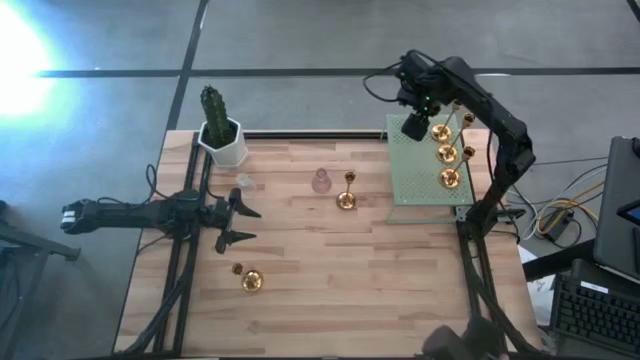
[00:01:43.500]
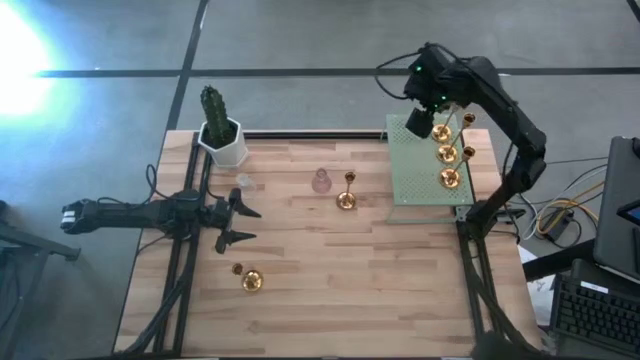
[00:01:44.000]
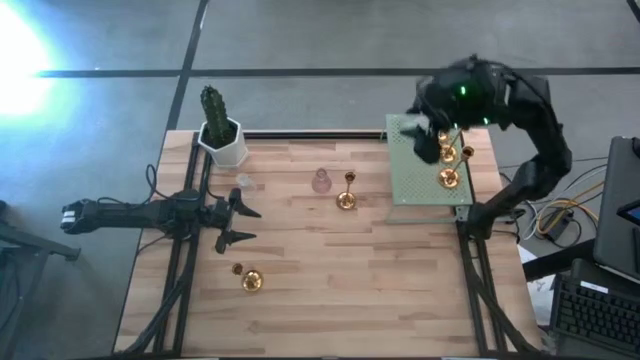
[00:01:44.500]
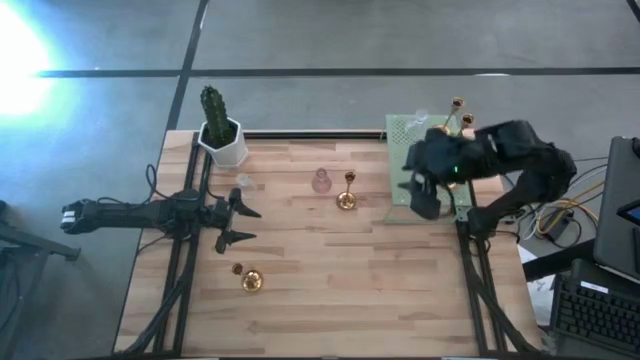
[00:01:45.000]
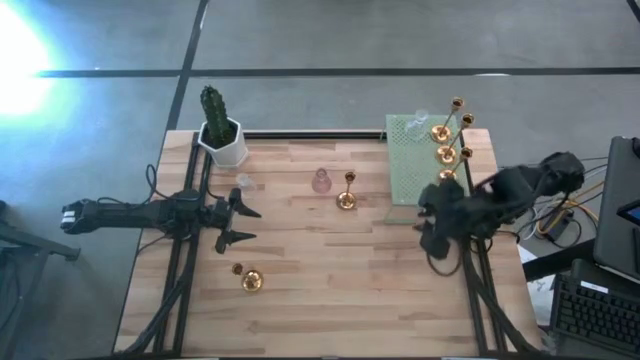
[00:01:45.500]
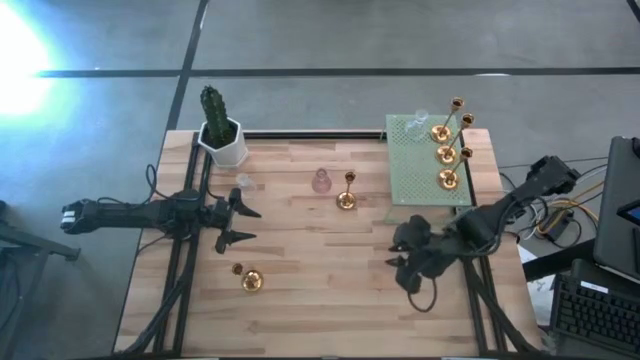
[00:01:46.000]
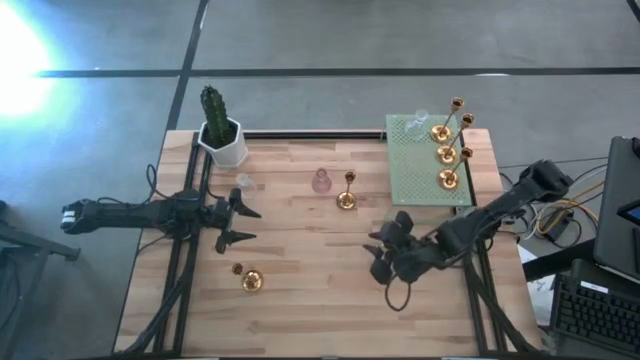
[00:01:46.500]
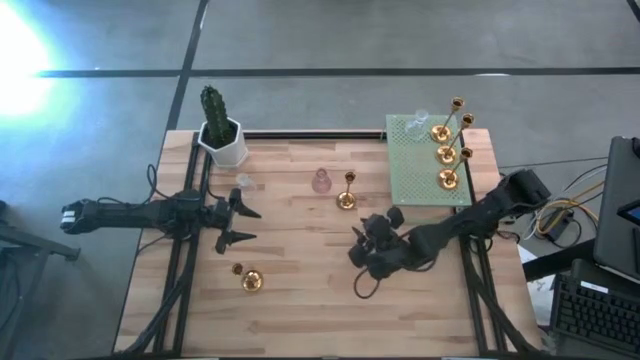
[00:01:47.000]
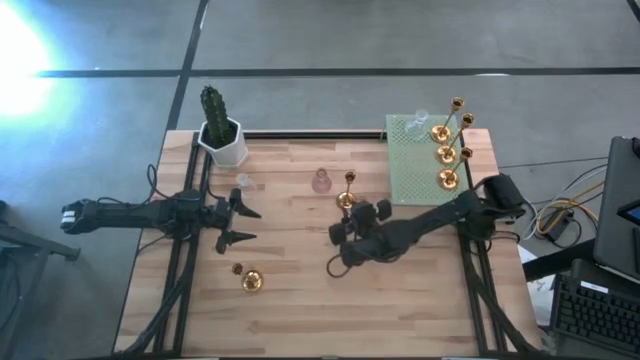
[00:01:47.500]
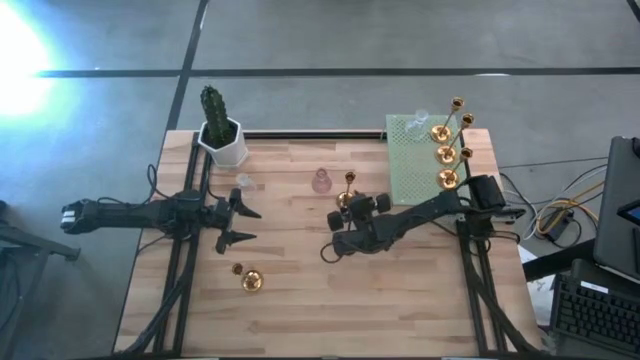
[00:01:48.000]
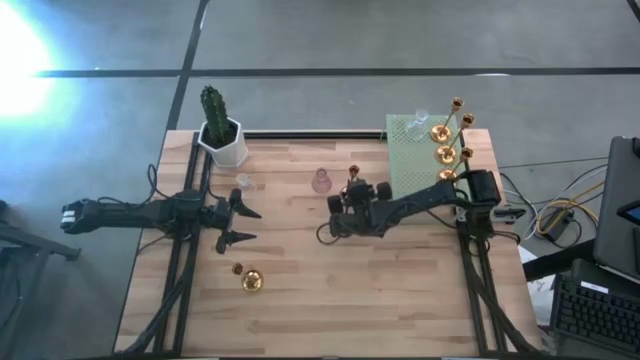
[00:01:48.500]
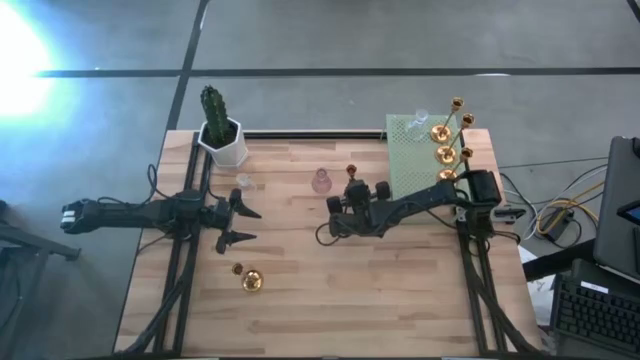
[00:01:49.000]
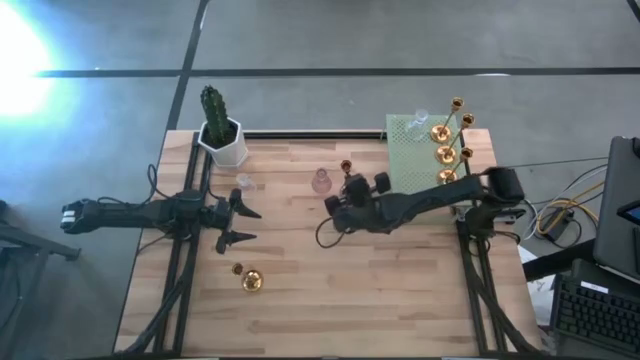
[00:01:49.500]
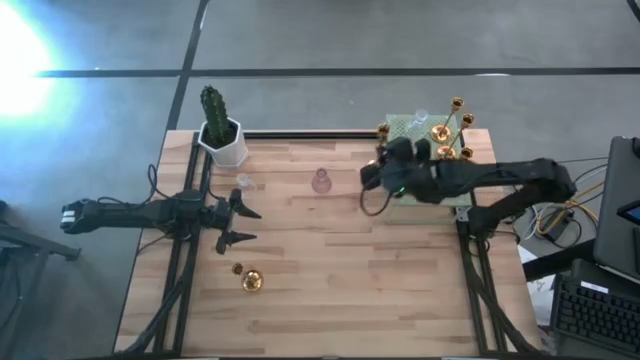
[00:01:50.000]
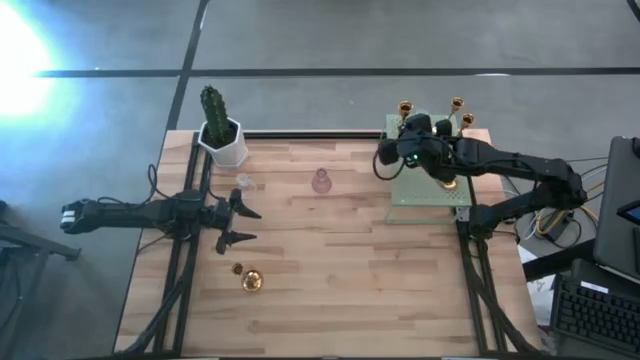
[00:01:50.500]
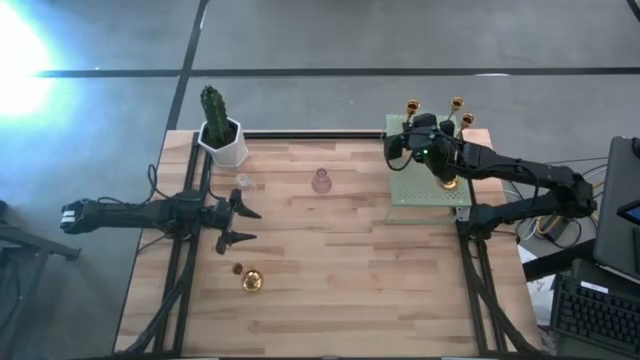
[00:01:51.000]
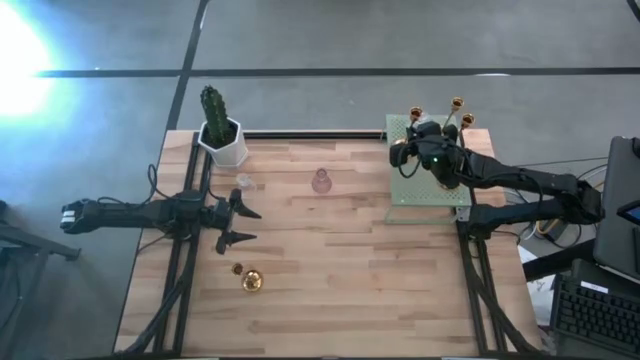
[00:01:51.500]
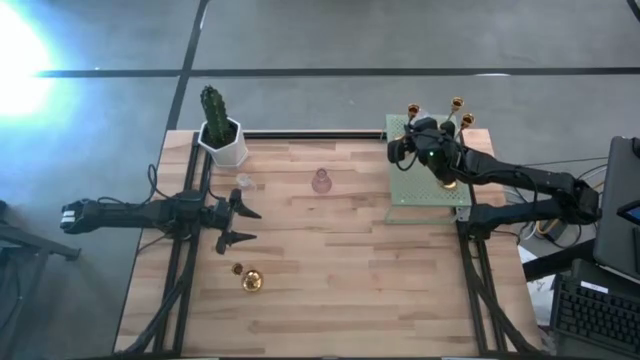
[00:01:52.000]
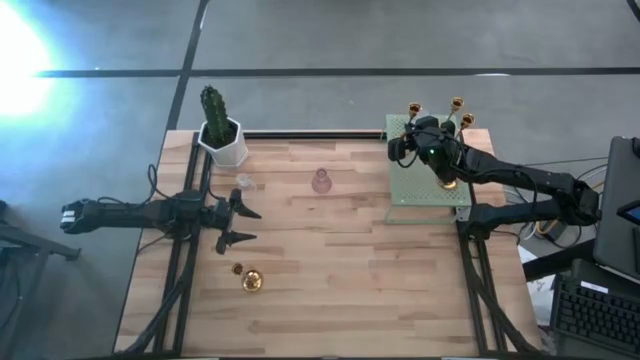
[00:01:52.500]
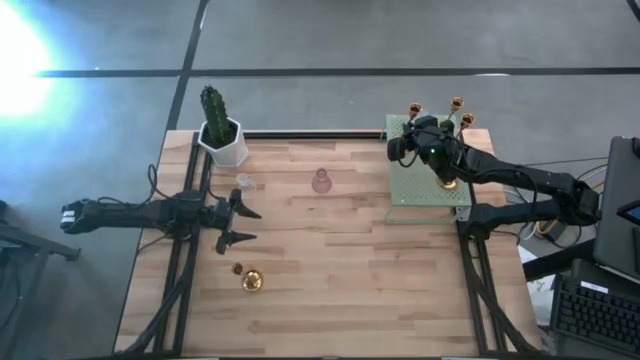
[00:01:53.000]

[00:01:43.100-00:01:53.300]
Task: Pick & Place candle stick holders
Put the top gold candle holder on the shelf

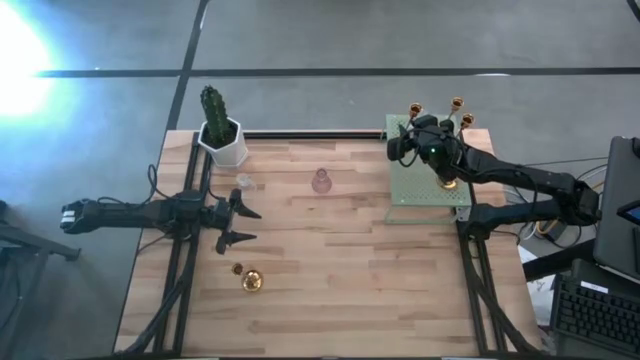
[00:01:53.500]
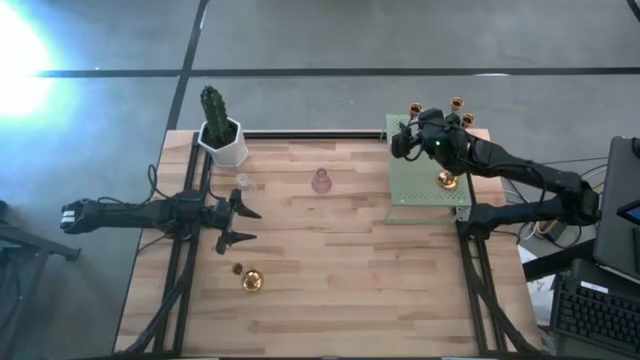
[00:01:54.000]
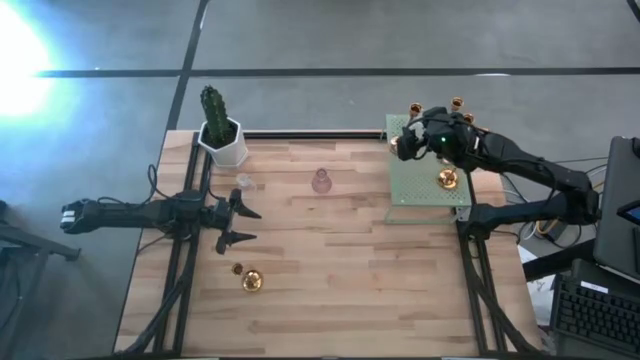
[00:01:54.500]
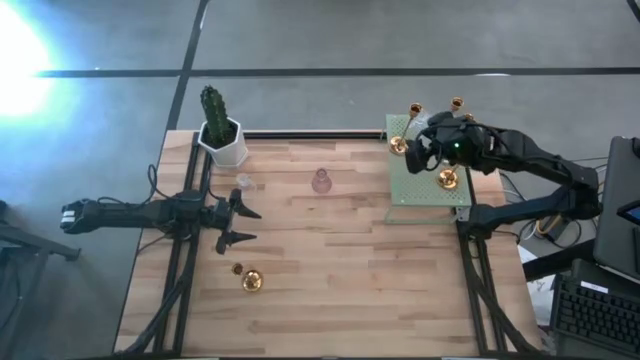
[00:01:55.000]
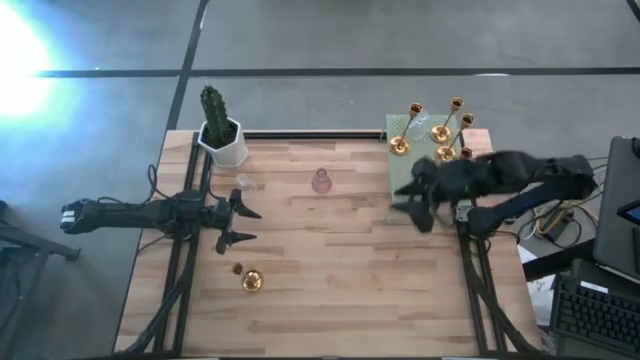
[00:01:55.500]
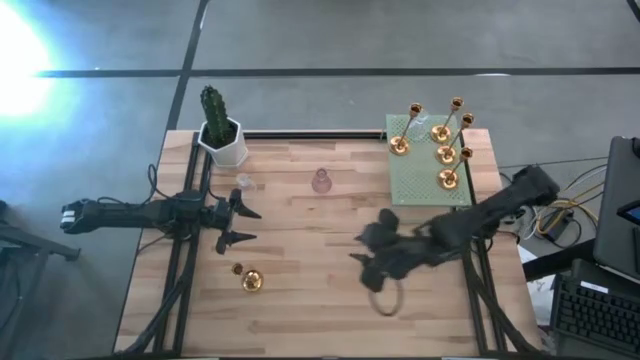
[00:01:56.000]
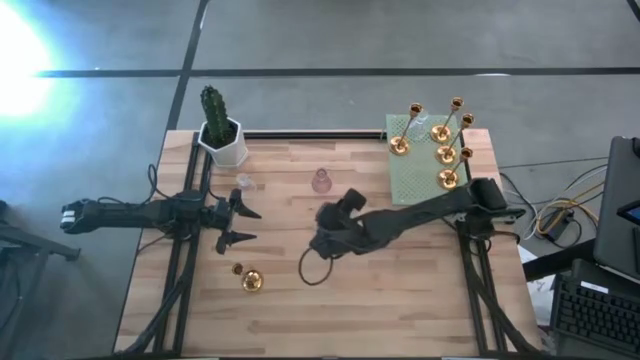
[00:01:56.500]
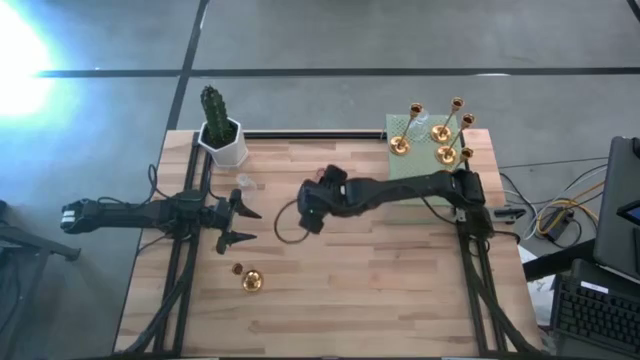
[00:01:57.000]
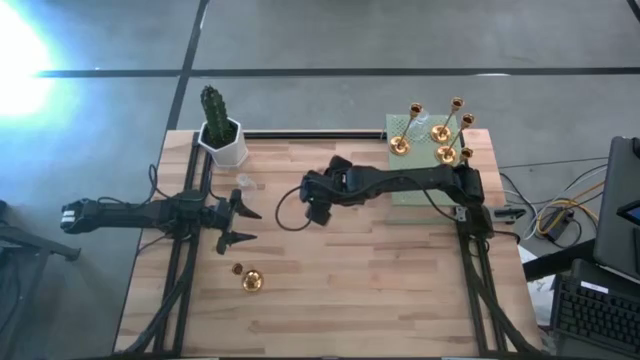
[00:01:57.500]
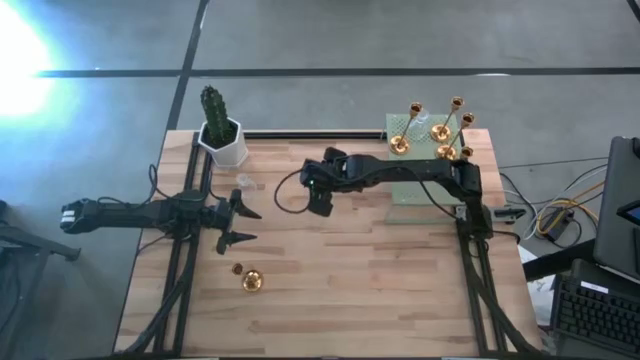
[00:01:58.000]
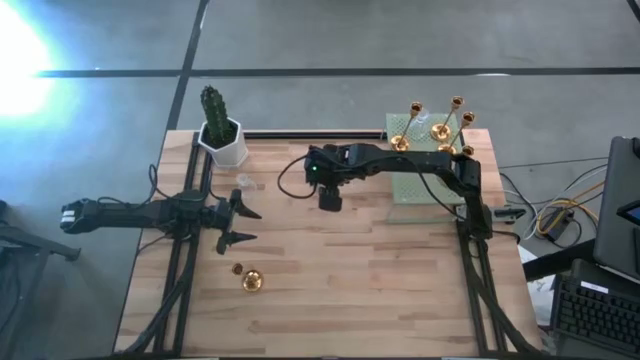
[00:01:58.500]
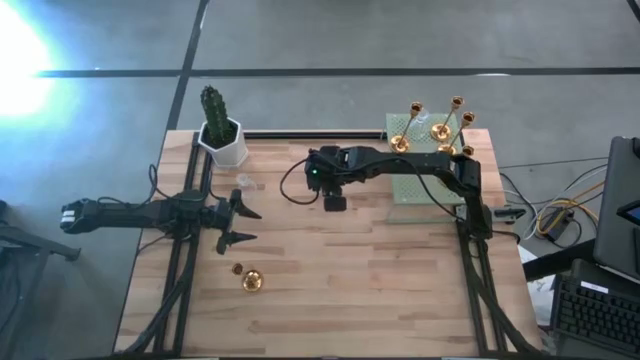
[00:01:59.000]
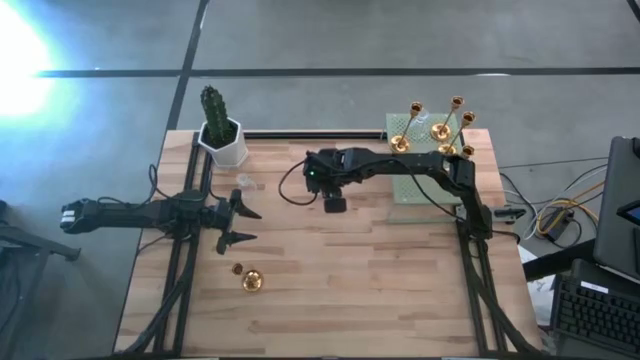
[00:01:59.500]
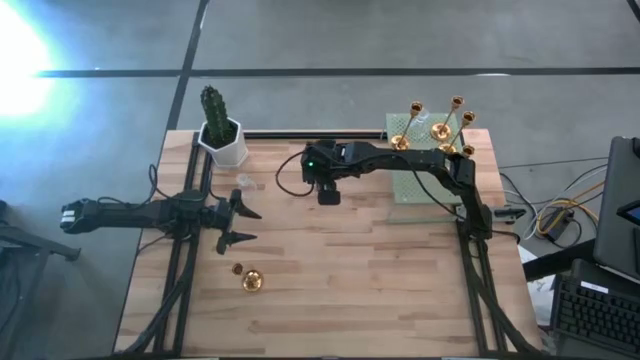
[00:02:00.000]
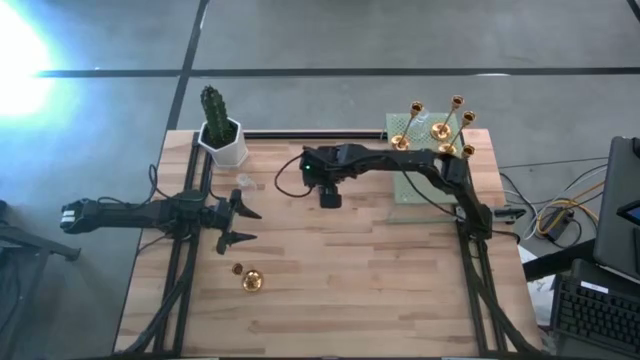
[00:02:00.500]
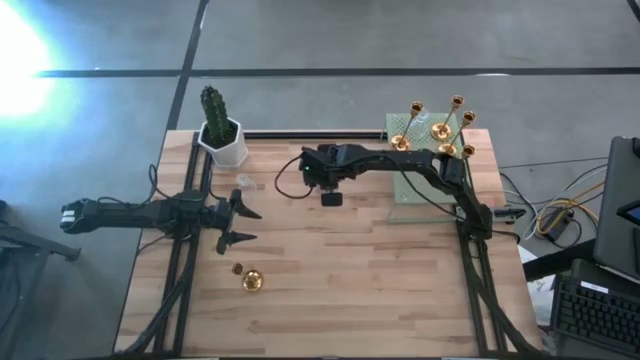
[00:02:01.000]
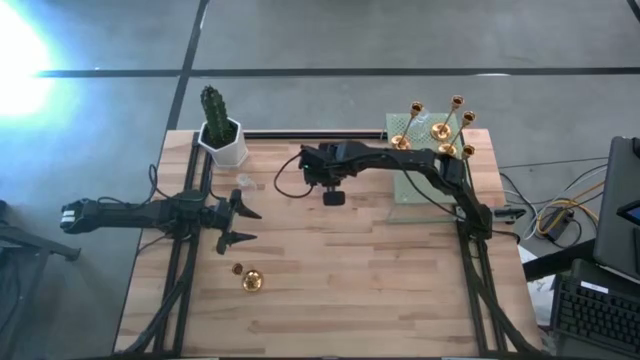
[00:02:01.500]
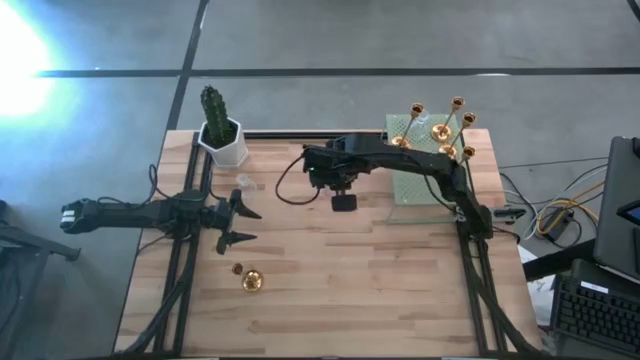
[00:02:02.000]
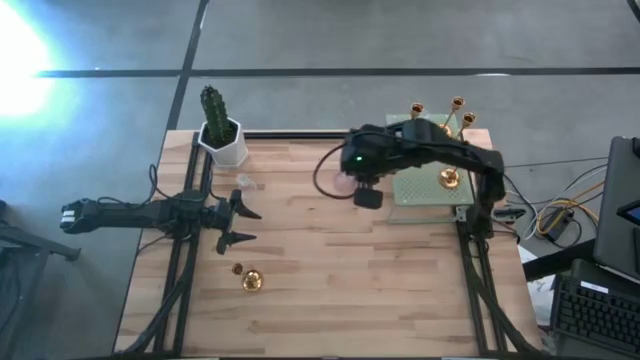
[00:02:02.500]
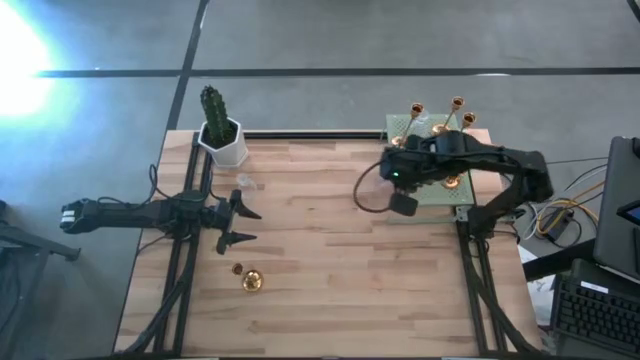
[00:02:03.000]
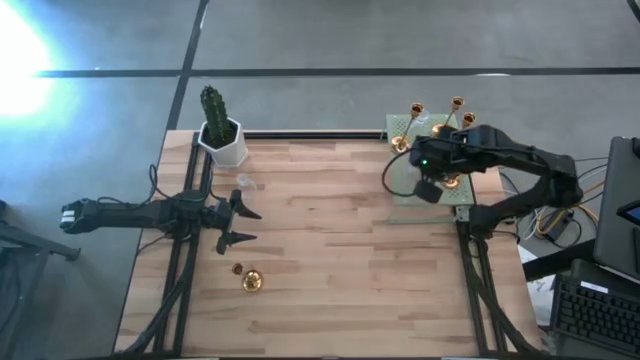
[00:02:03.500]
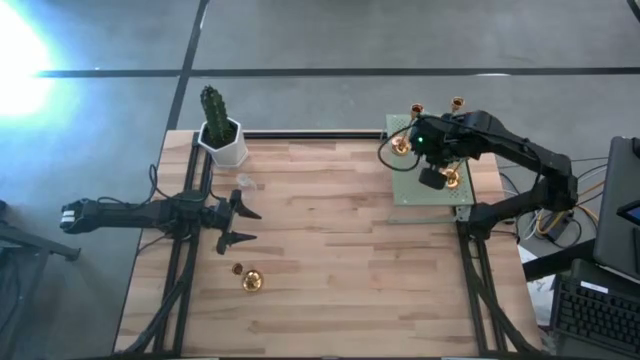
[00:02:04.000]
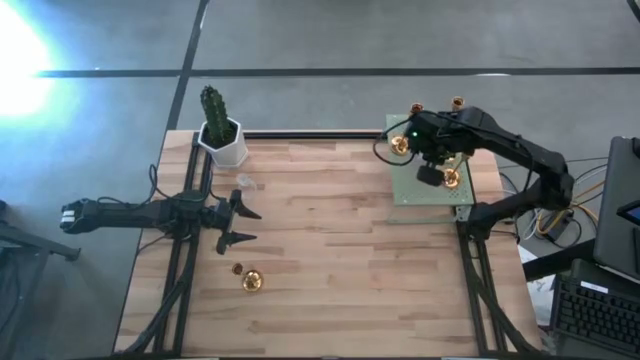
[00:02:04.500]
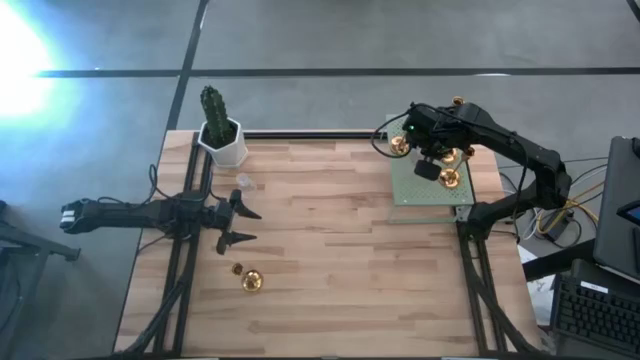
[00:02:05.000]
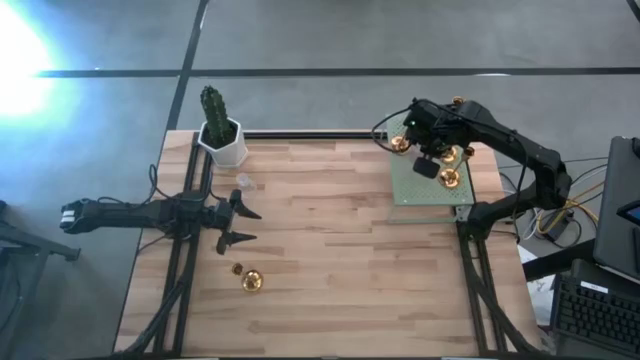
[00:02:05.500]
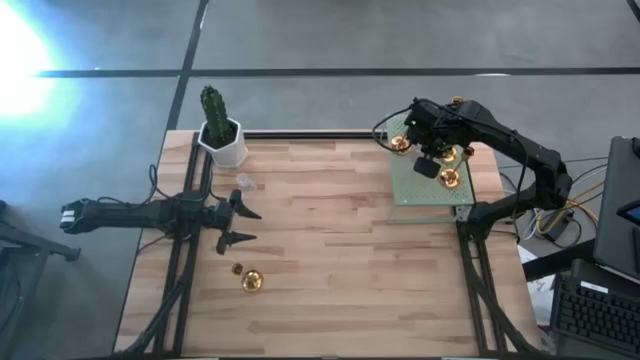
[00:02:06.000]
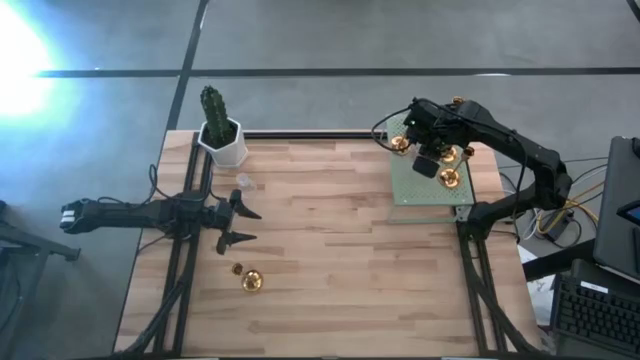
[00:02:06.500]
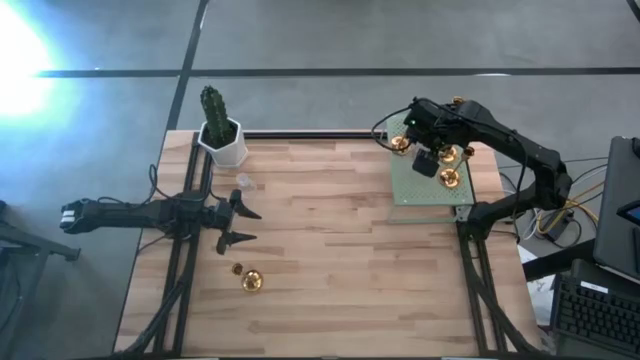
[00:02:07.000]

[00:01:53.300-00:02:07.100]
Put the pink glass candle holder on the shelf
